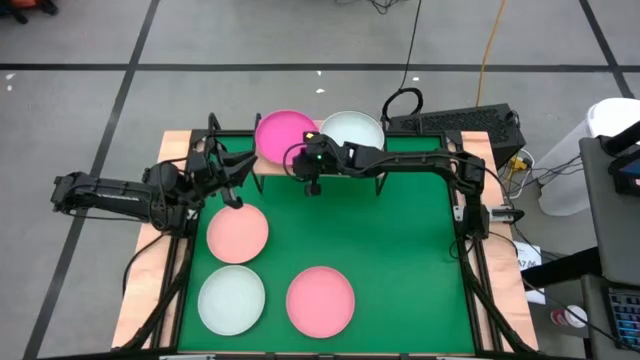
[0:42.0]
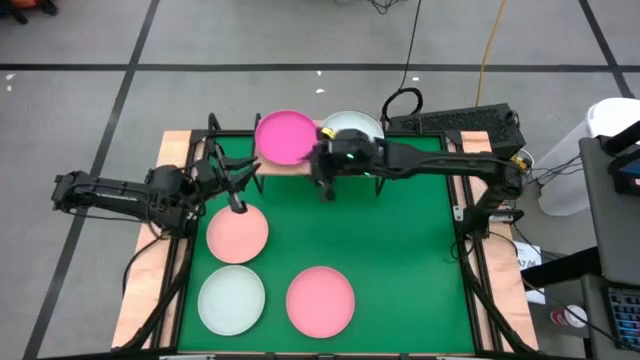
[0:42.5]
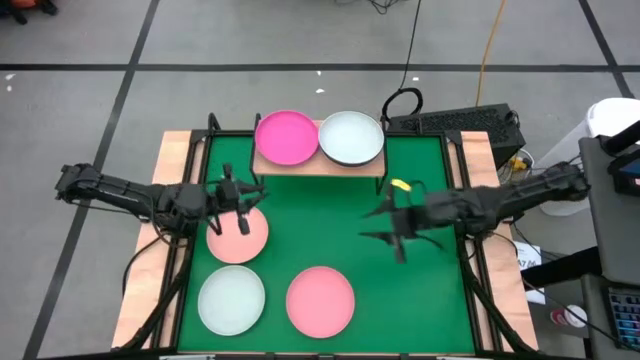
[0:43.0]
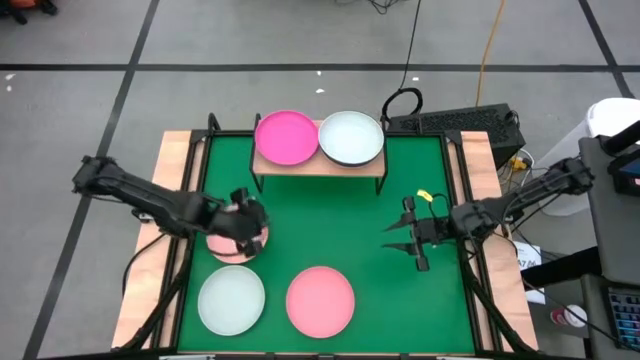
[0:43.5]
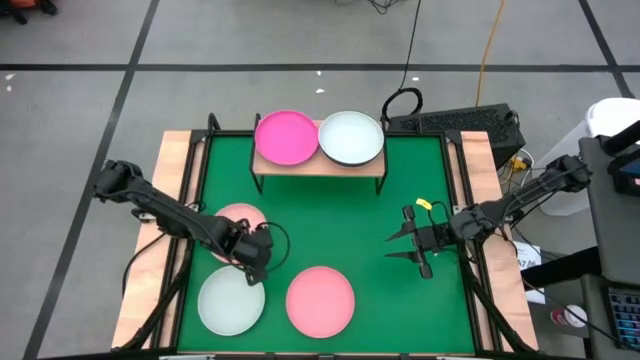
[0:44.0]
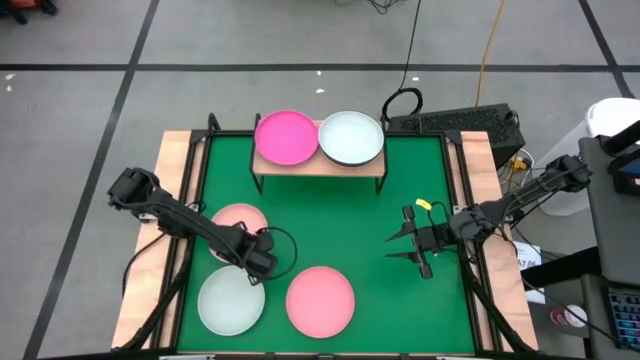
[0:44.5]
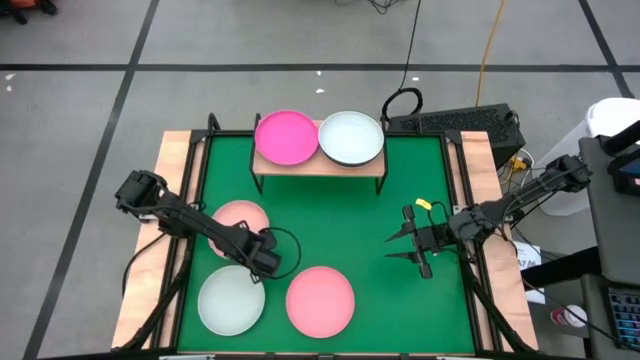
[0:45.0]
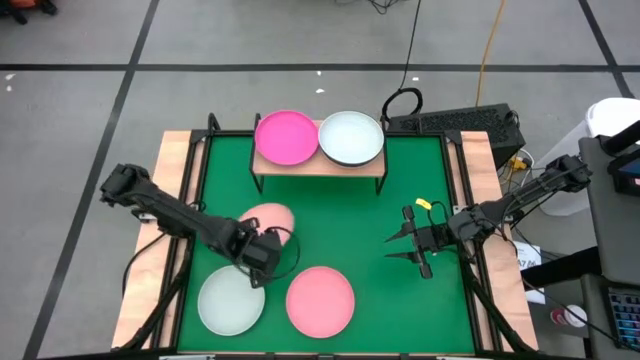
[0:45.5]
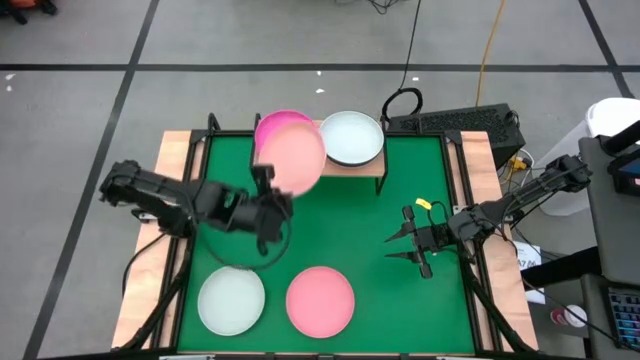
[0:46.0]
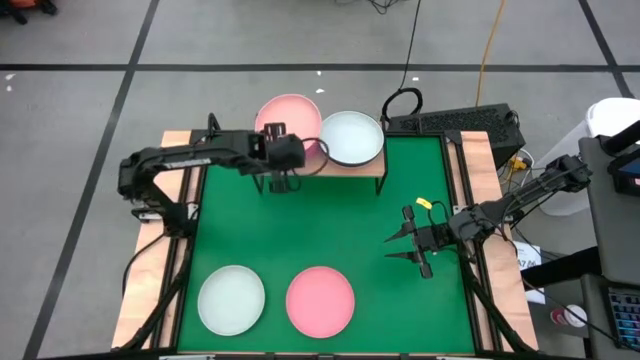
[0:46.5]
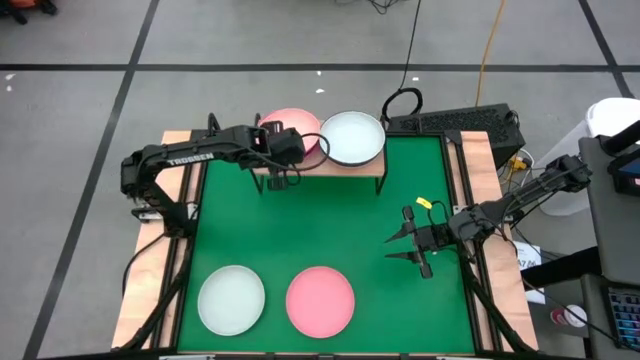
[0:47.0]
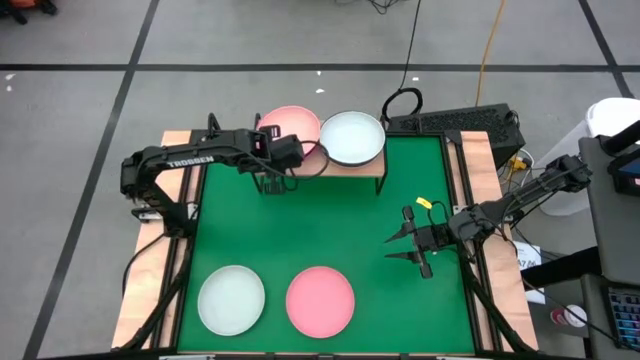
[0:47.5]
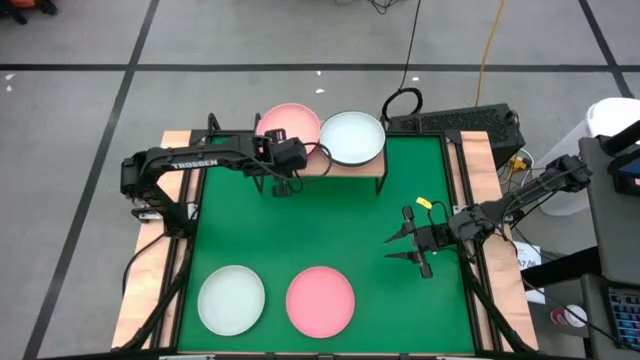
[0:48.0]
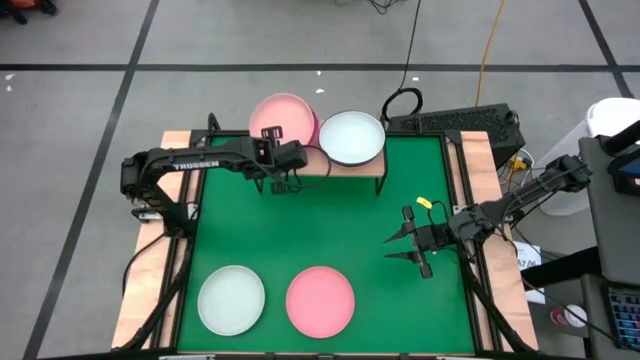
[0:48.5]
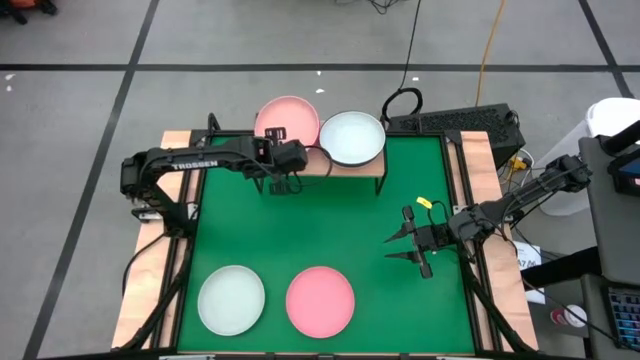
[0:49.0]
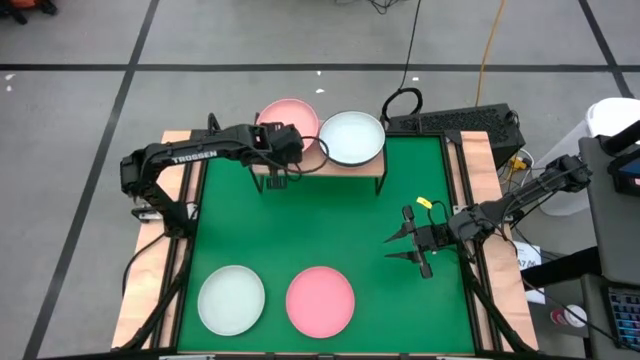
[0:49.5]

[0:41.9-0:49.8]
Task: Place and stack plates onto a shelf
Stack the light orange plate on top of the pink plate on the shelf

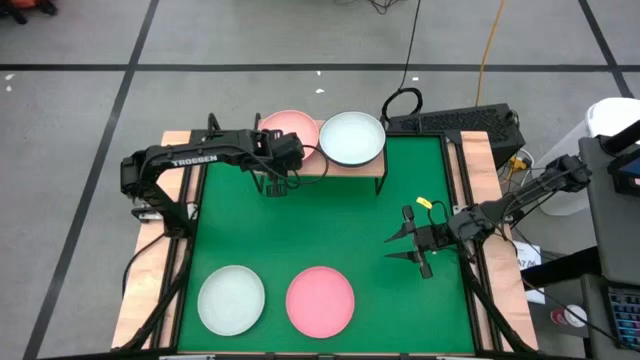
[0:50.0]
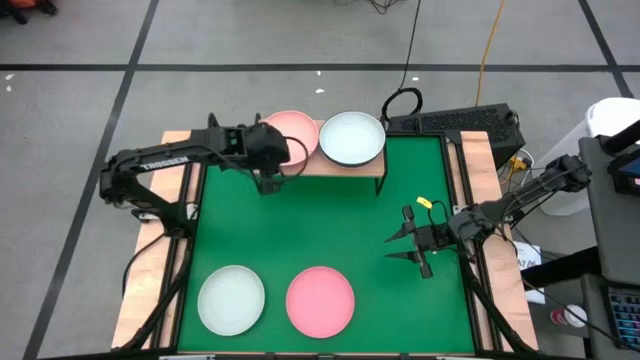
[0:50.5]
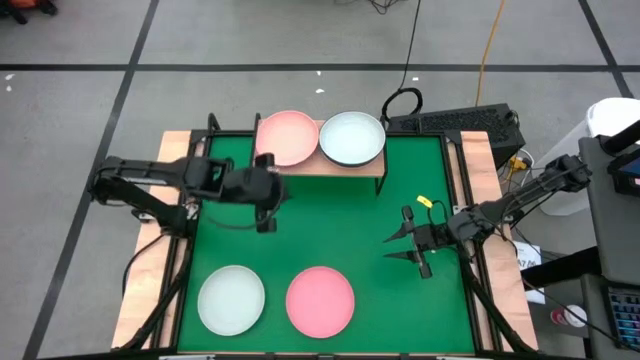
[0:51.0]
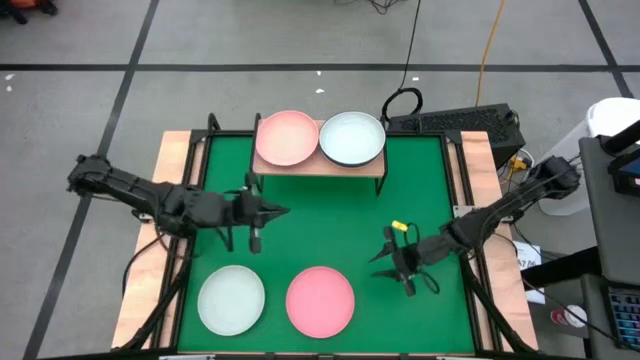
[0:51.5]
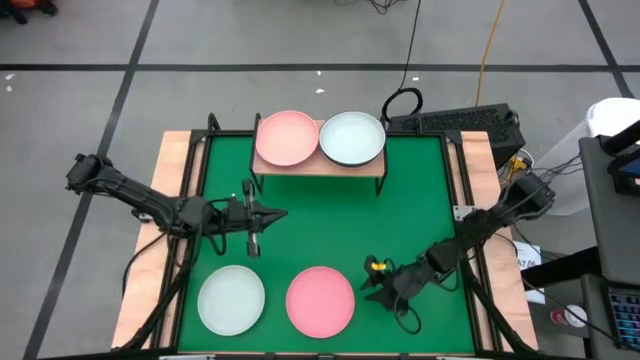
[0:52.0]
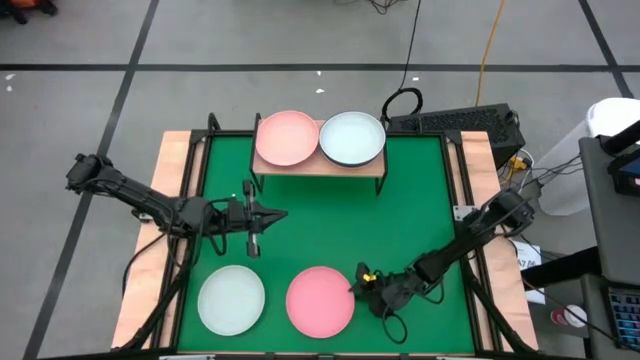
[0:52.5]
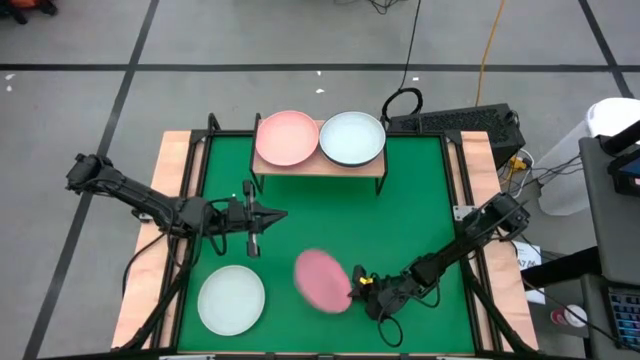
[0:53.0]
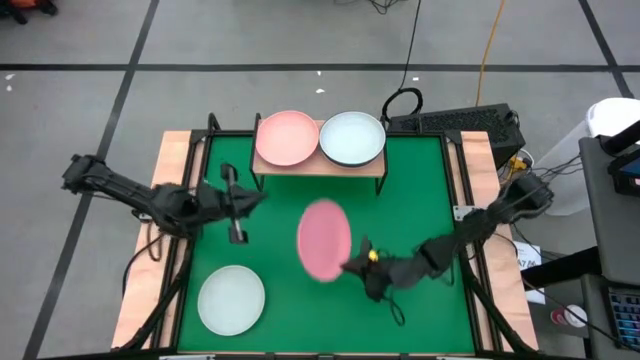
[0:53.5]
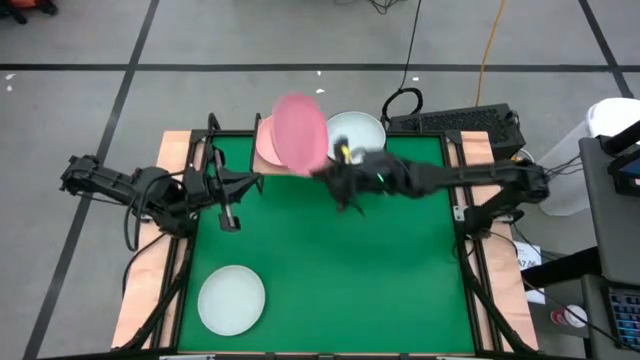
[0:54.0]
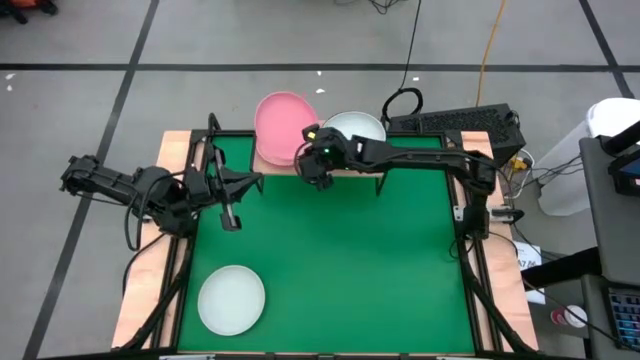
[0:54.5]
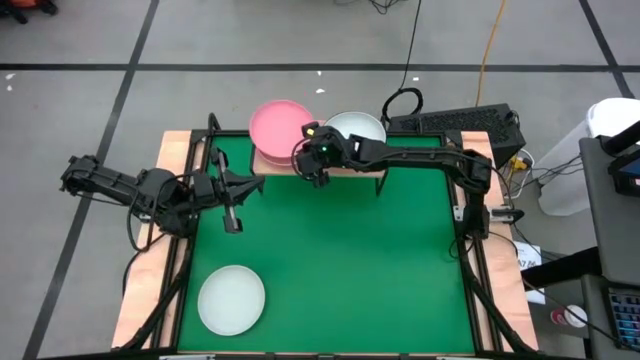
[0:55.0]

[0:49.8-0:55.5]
Stack the light pink plate on top of the light orange plate on the shelf

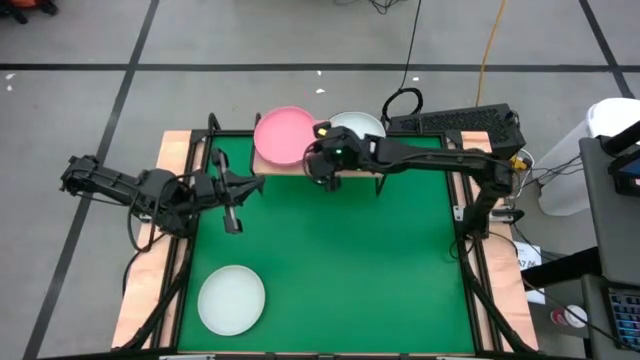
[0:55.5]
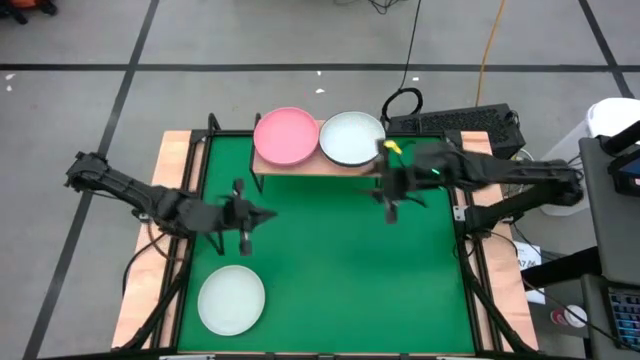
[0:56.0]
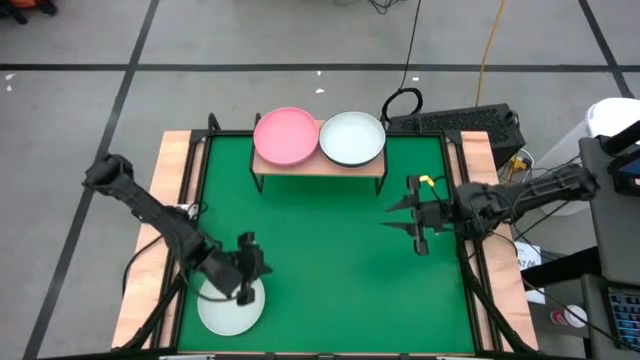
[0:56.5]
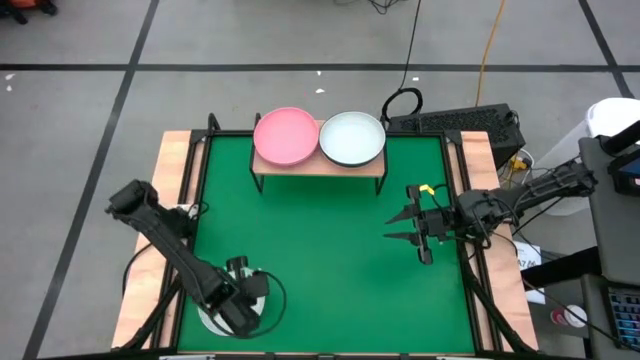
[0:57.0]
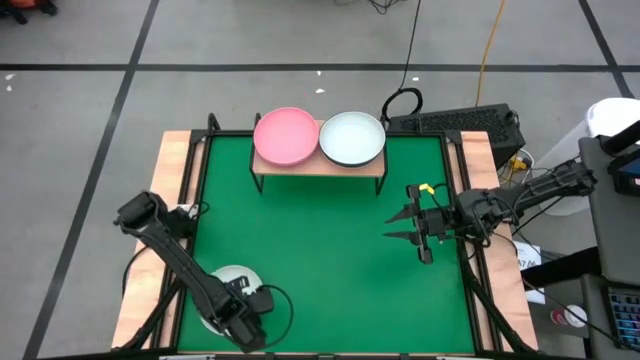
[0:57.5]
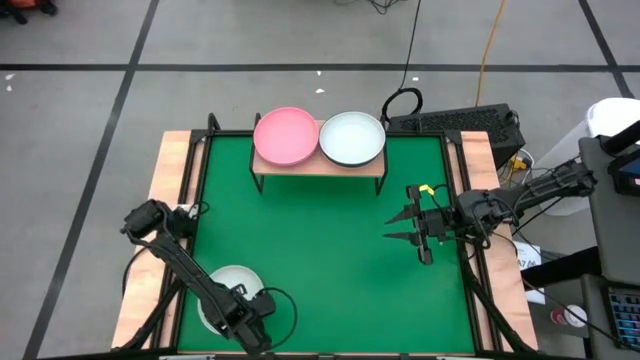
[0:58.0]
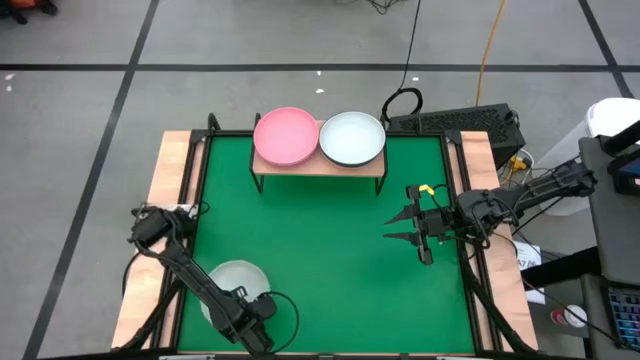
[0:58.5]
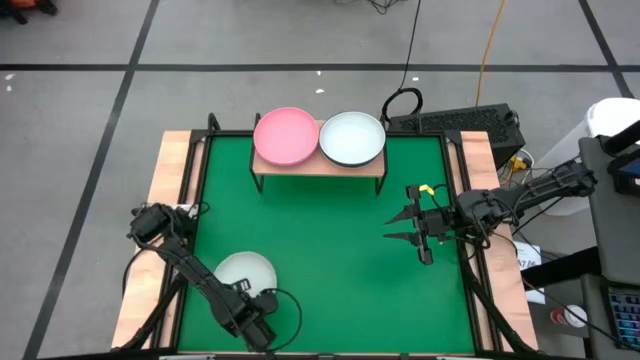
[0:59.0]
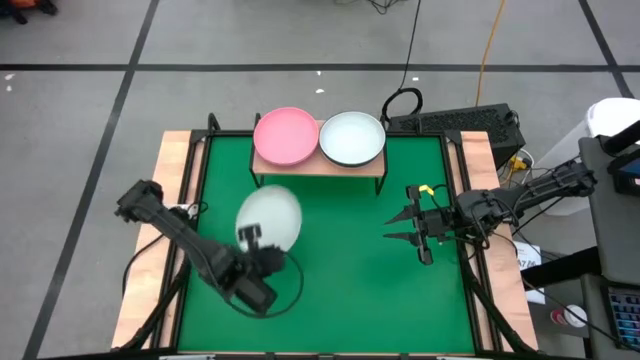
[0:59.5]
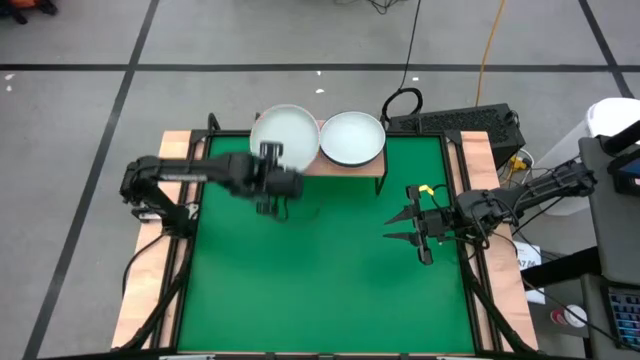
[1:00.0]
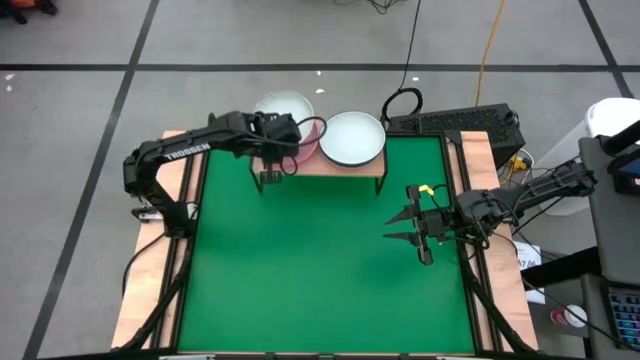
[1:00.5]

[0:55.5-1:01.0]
Stack the white plate on the light pink plate on the shelf

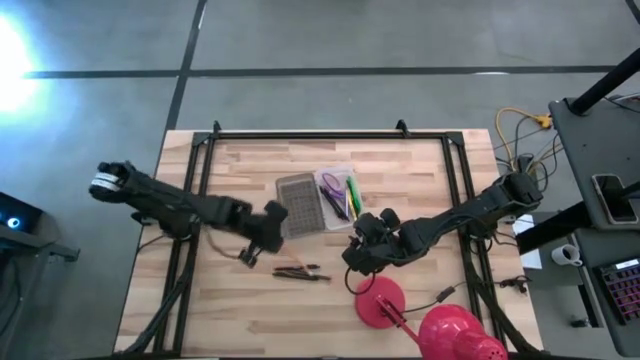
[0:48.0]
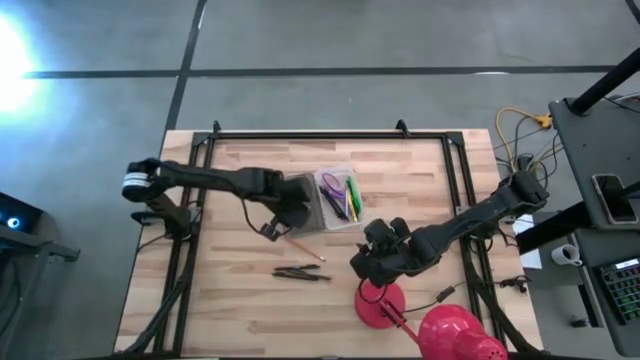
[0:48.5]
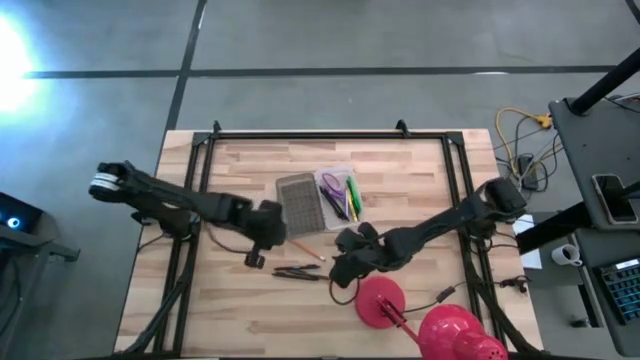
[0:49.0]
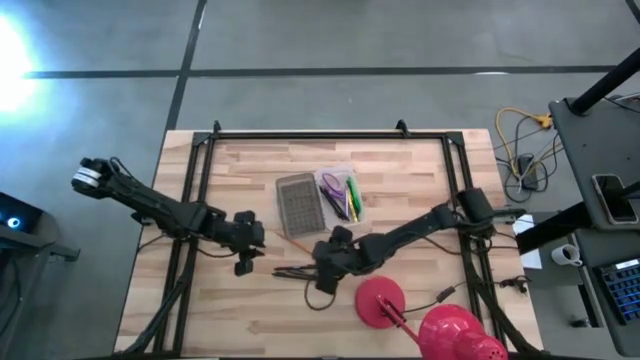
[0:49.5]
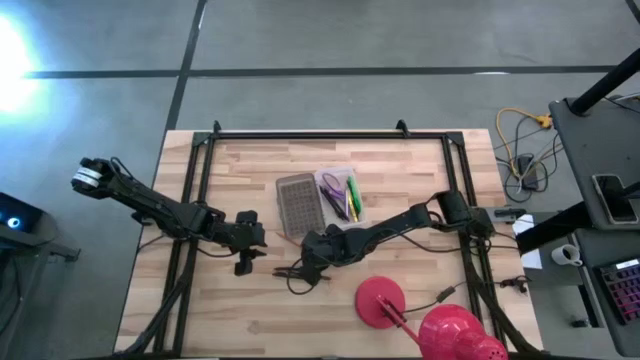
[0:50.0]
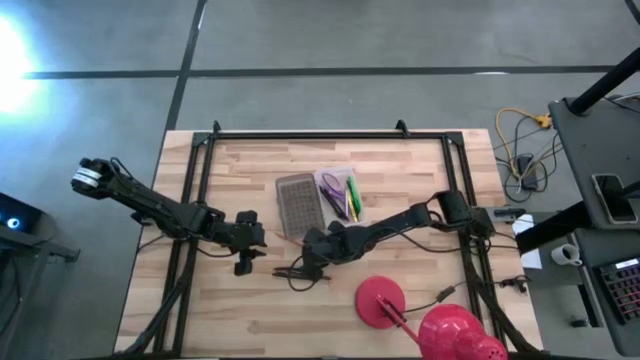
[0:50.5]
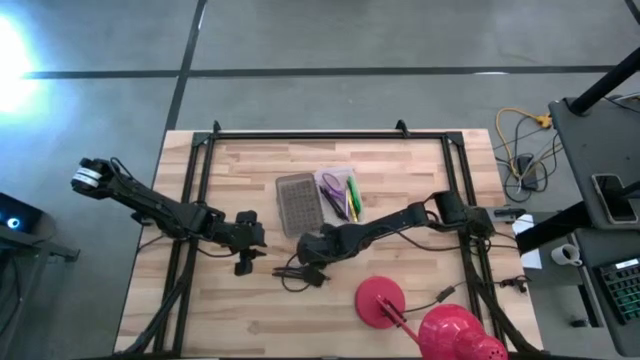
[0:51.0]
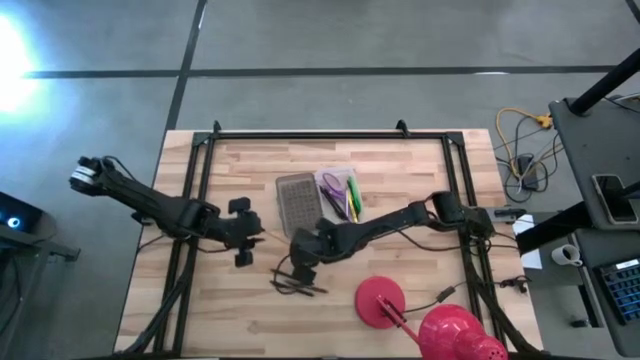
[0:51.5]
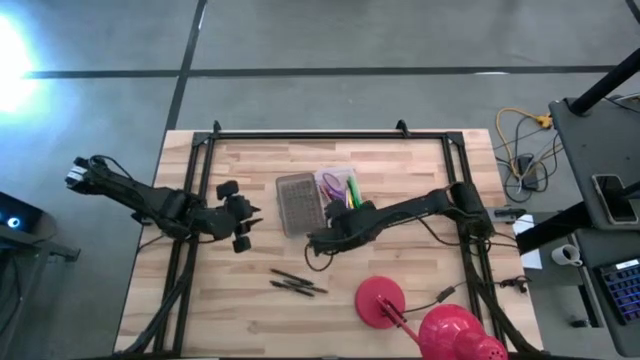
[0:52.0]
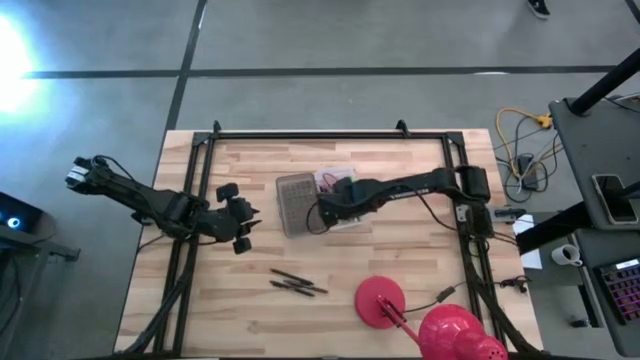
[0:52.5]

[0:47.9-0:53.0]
Task: Pick & place school supplies into a supply box
Put the orange pencil into the black supply box
